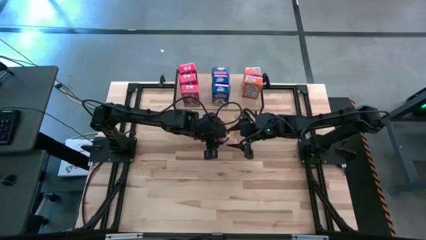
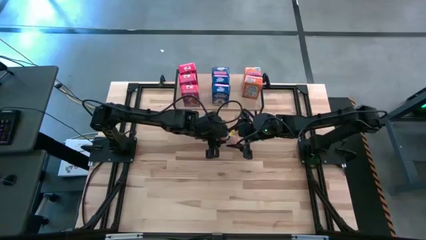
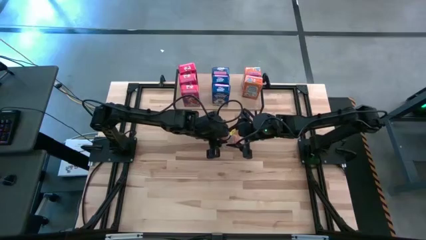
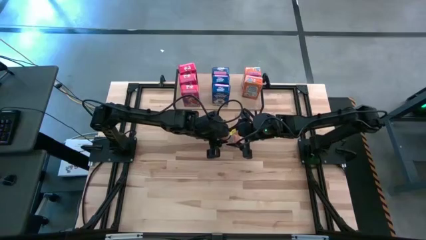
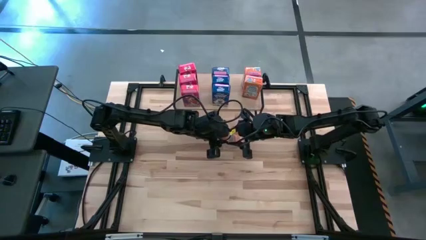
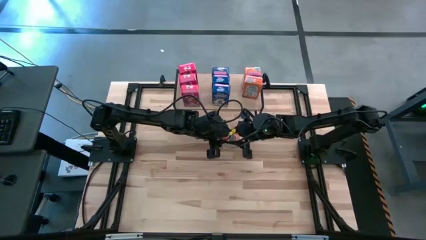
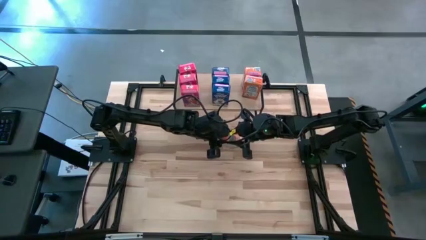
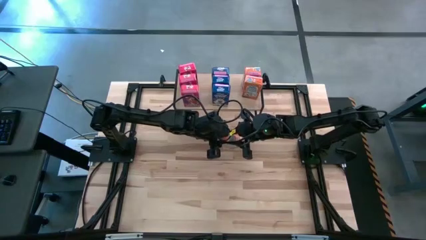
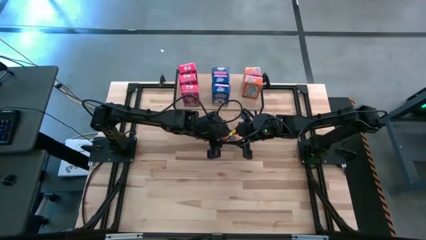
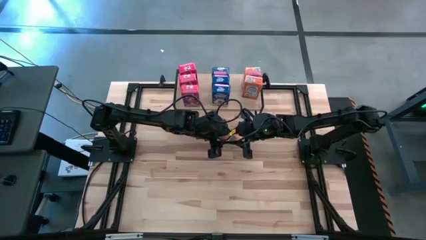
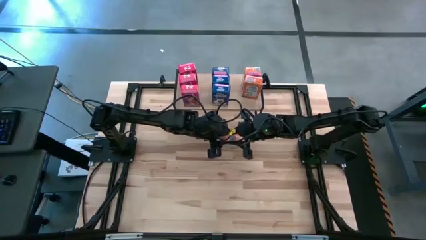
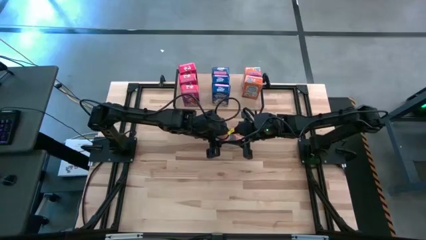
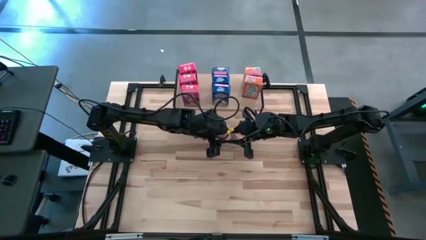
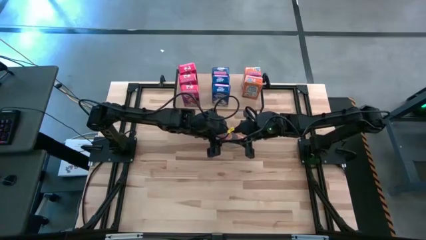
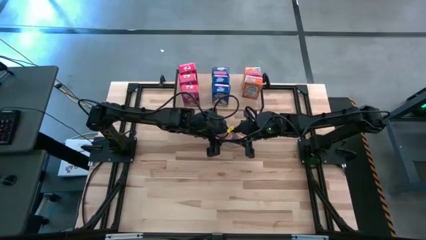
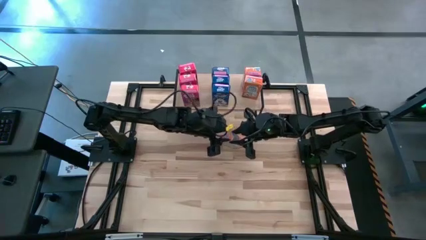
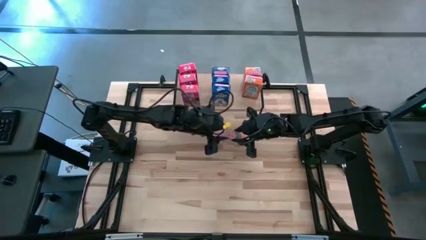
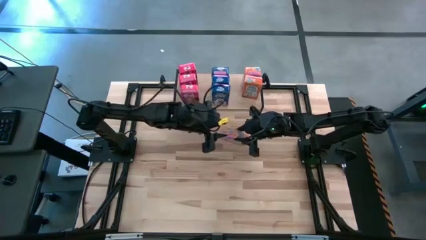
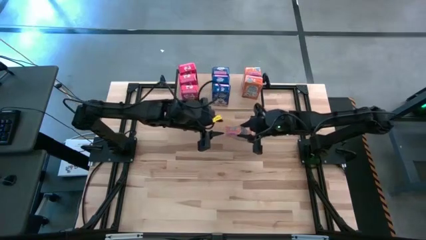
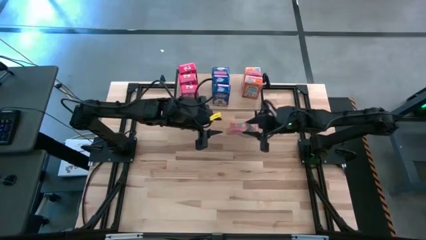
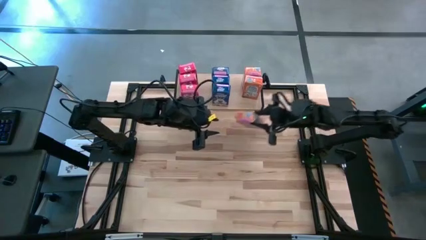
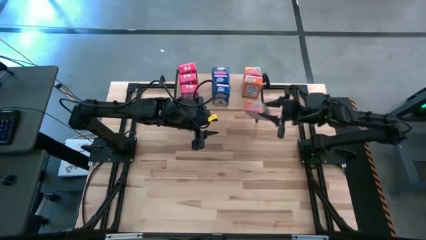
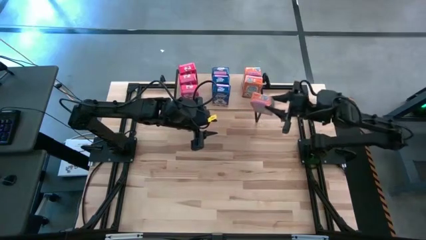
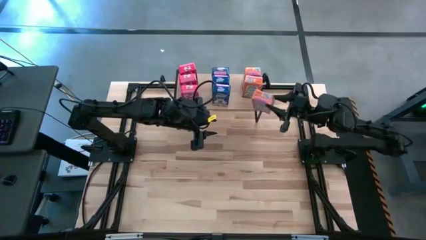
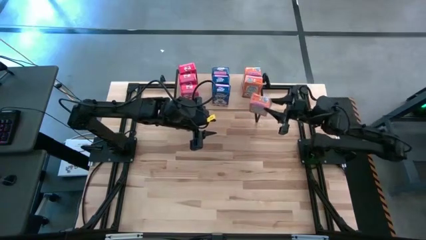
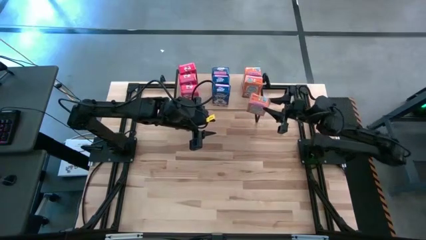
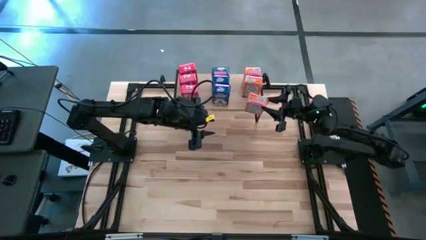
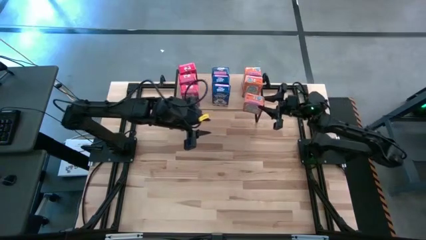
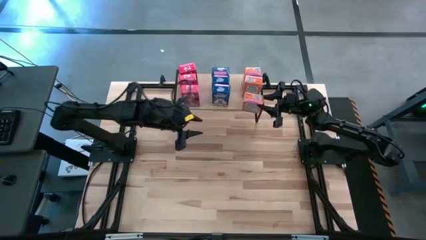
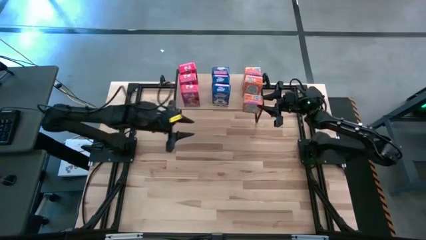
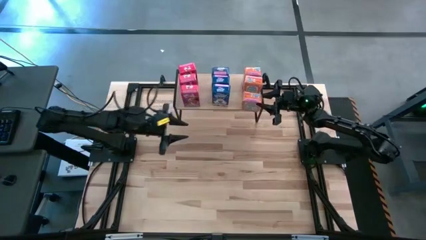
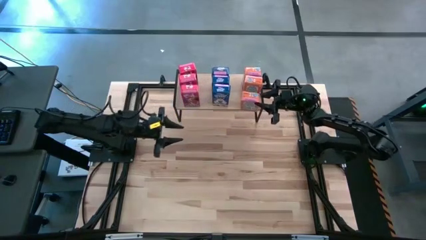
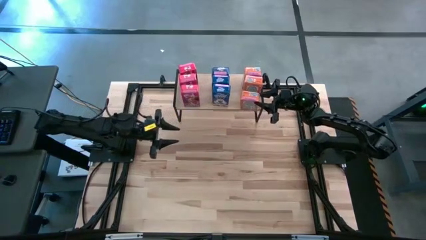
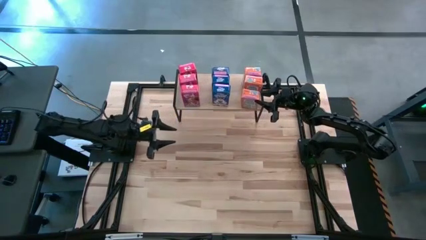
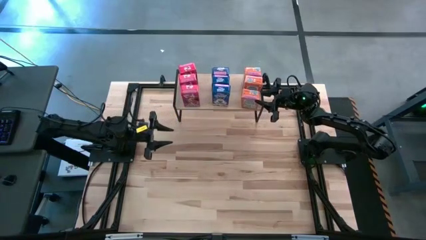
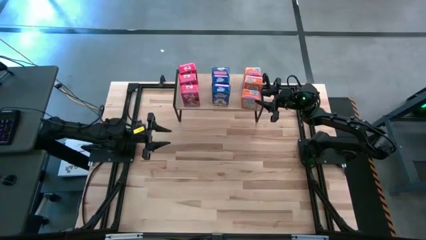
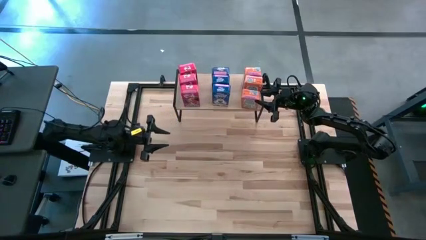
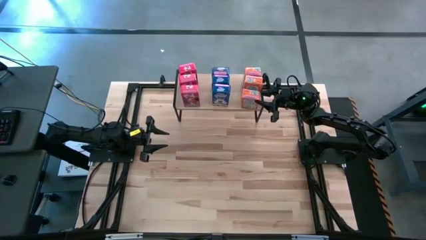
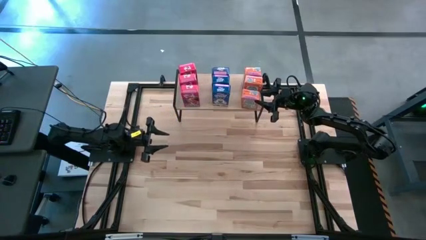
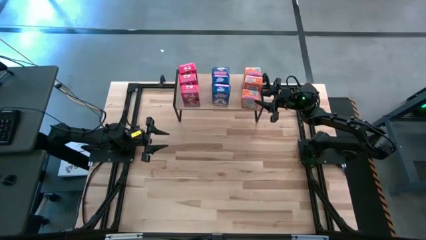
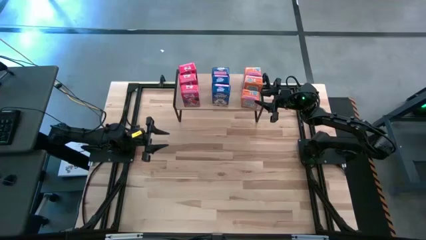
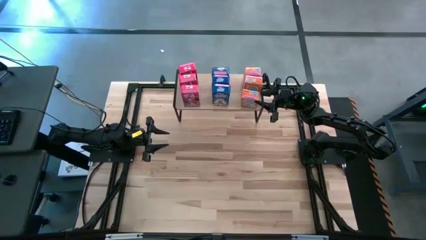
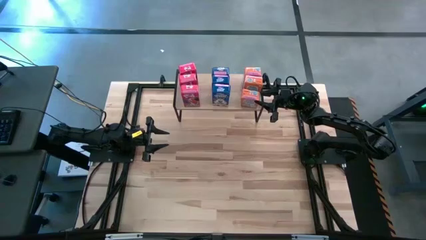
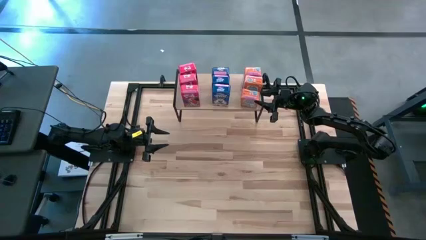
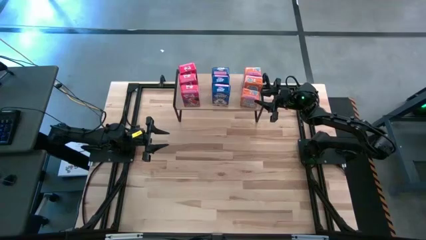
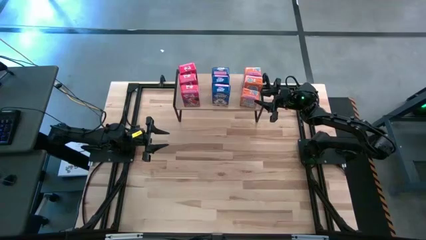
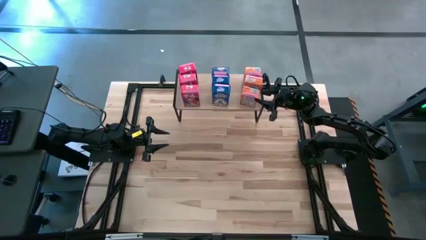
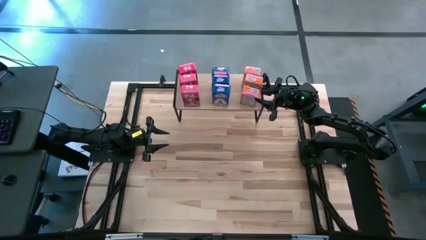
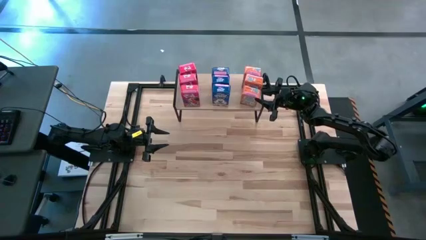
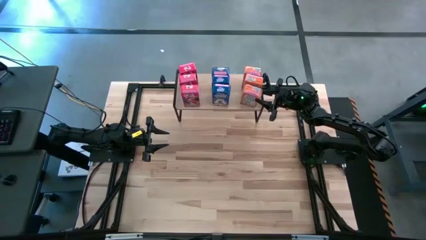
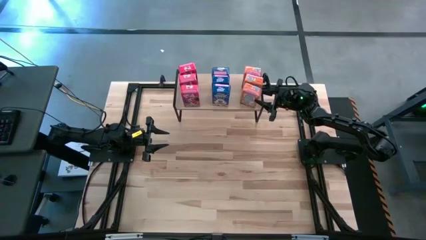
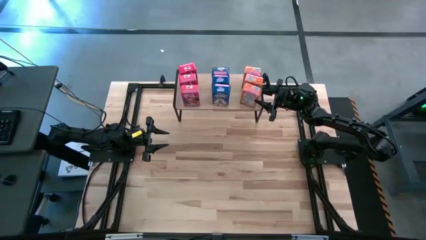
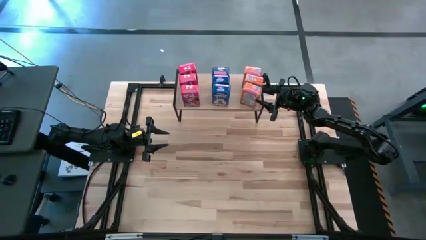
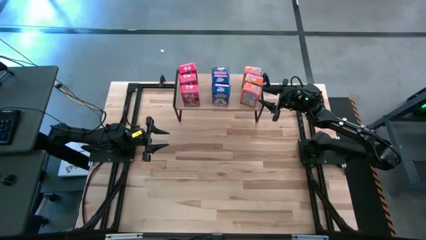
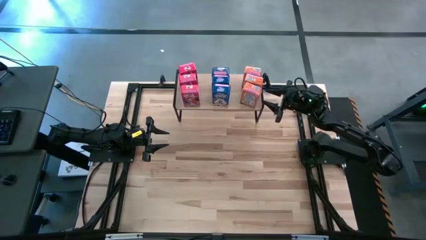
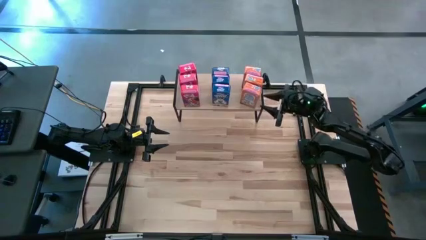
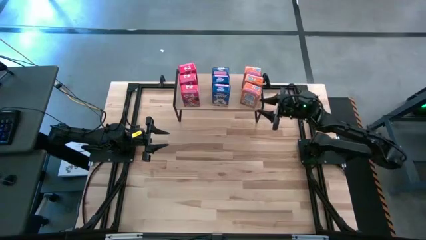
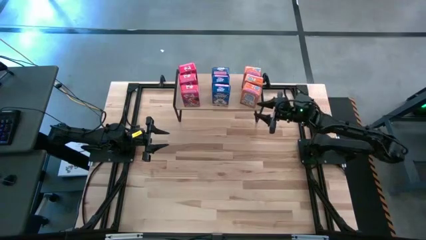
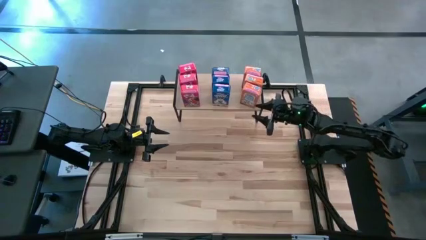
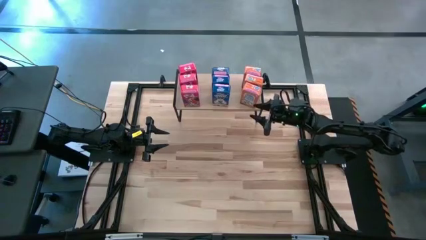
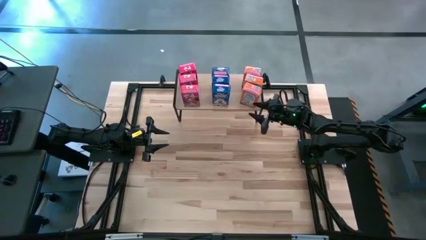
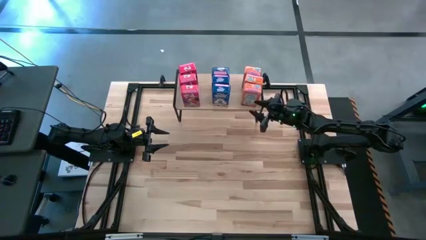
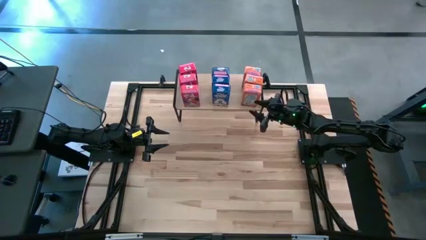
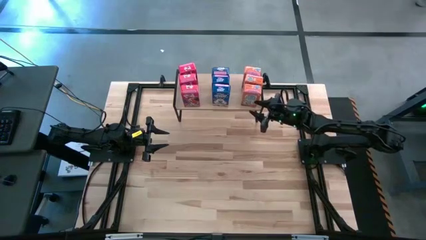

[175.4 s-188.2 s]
Task: Stack cereal on shelf
Put the orange cereal box on the shelf aligned with the other orange cereal boxes

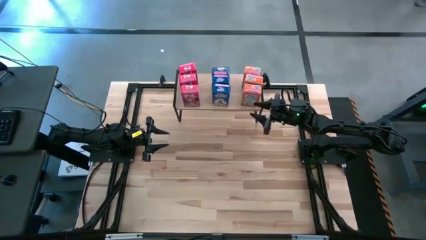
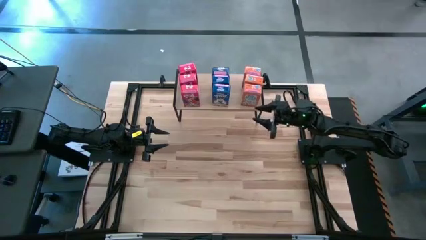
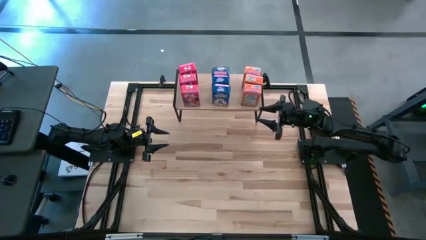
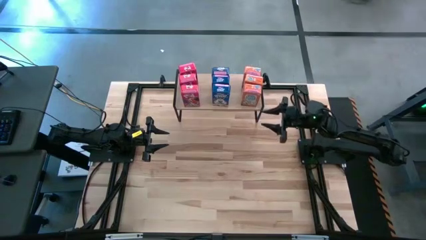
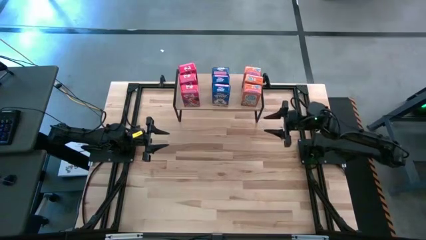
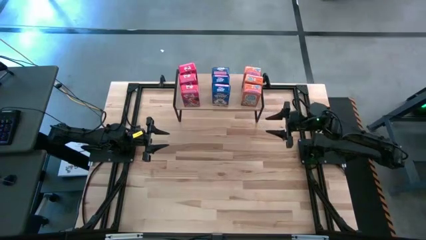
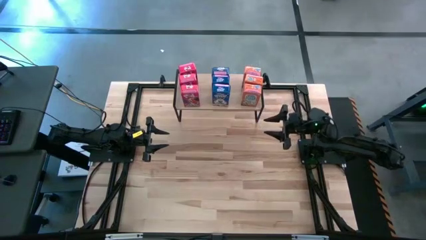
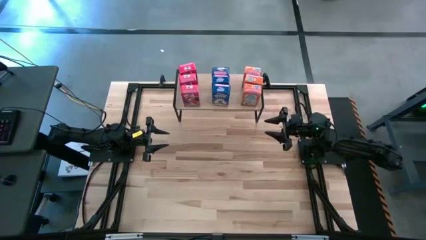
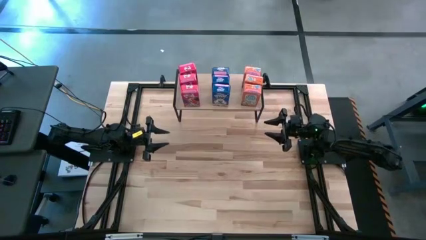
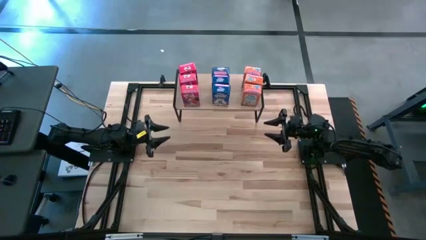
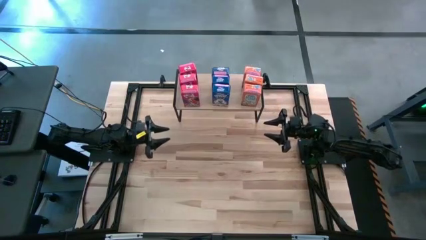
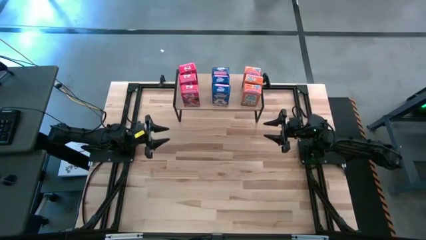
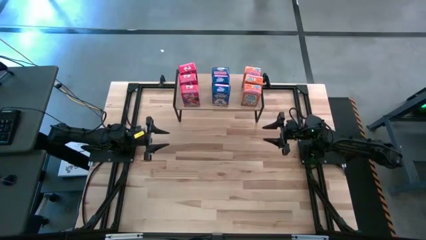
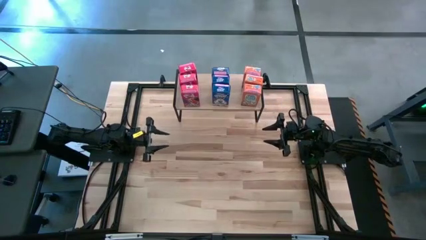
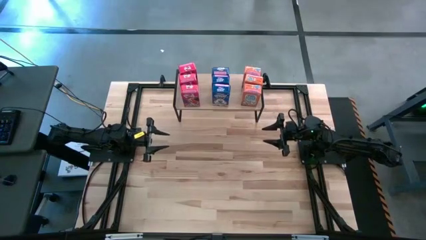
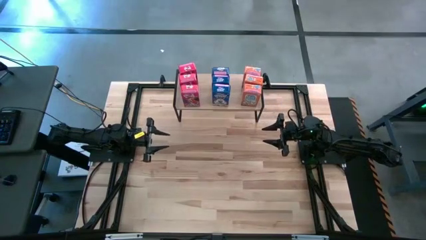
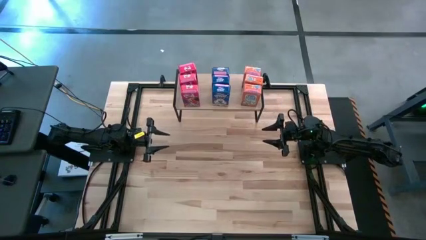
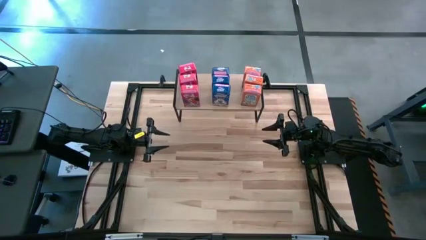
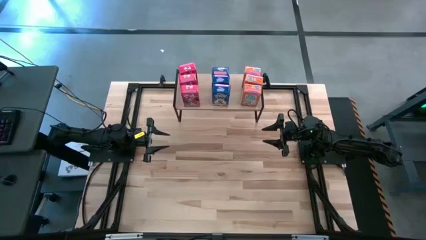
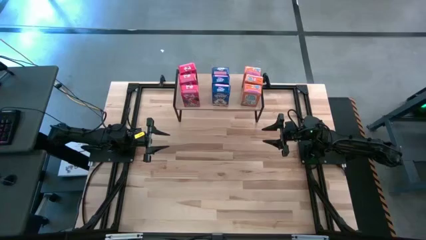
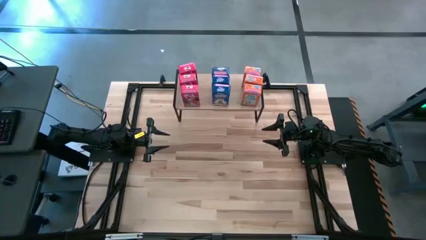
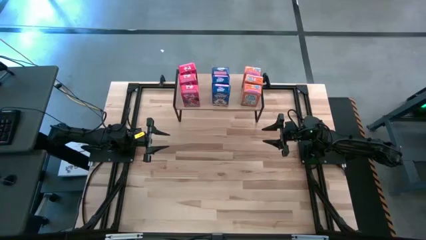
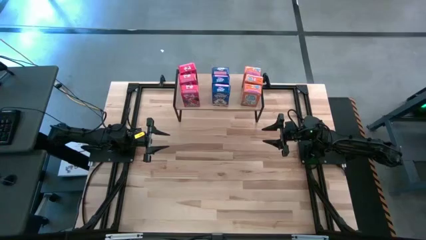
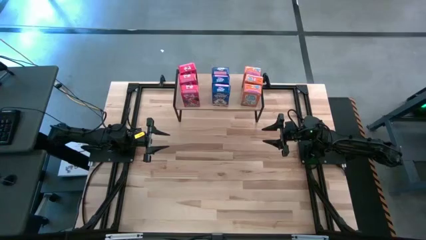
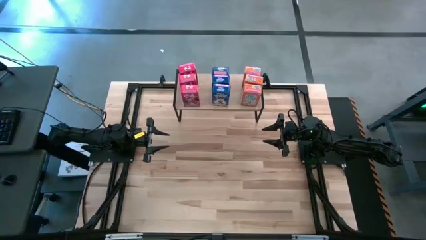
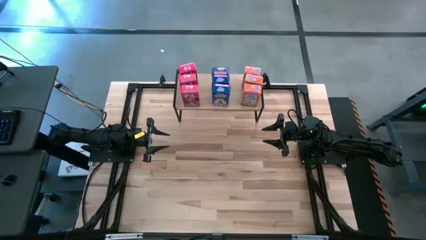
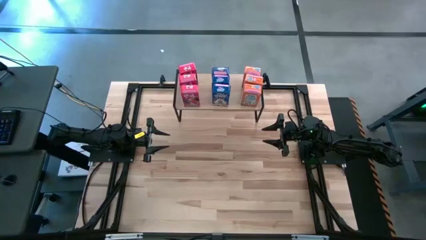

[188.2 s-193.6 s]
Return to Home Position
